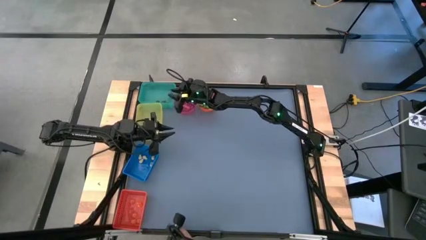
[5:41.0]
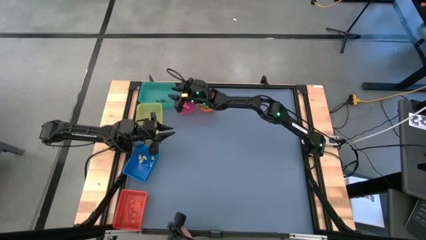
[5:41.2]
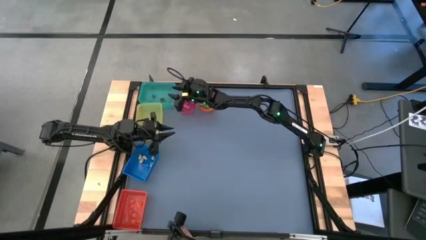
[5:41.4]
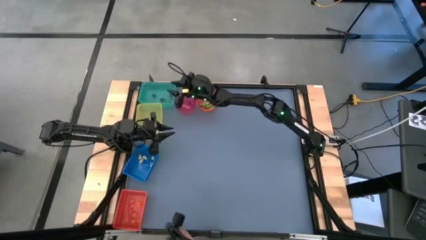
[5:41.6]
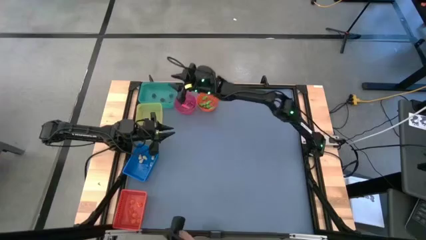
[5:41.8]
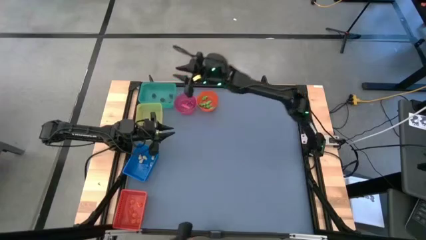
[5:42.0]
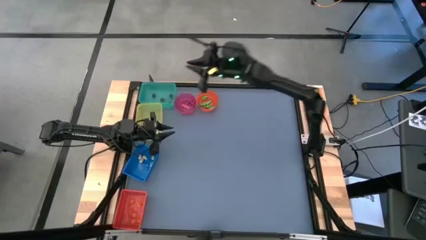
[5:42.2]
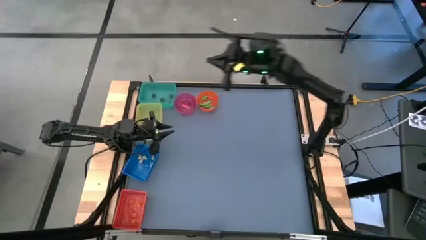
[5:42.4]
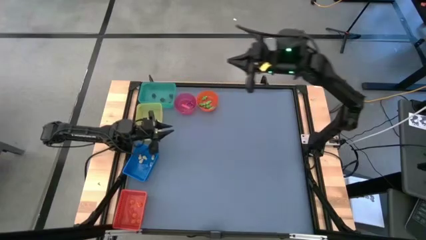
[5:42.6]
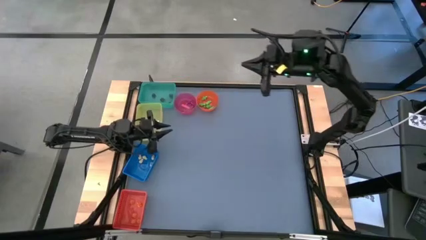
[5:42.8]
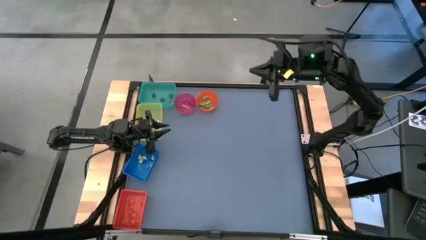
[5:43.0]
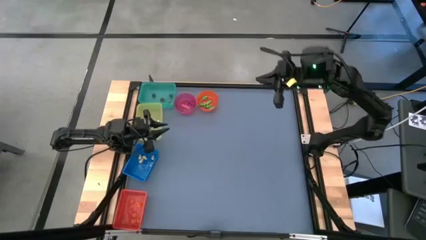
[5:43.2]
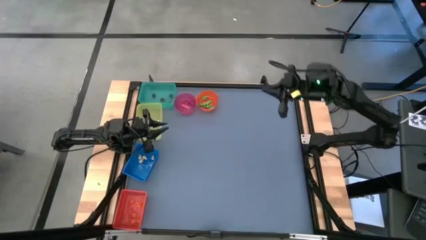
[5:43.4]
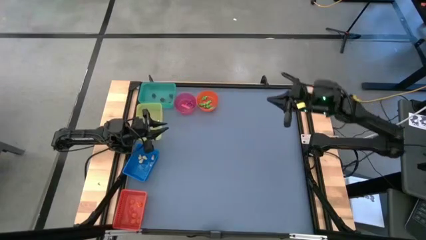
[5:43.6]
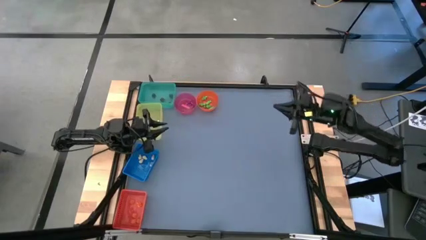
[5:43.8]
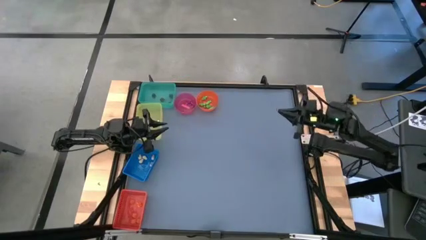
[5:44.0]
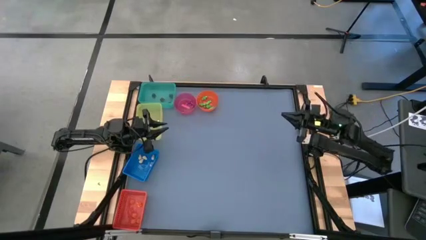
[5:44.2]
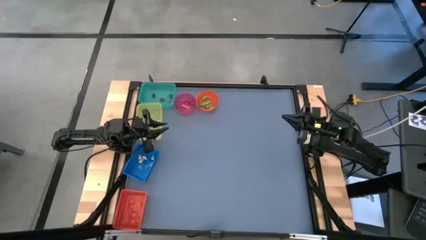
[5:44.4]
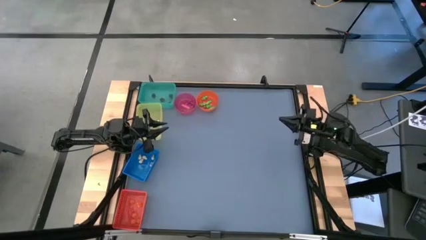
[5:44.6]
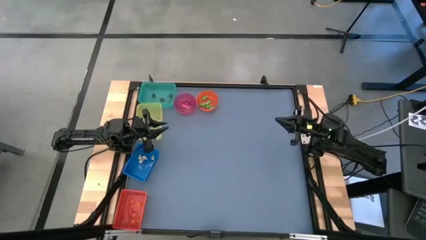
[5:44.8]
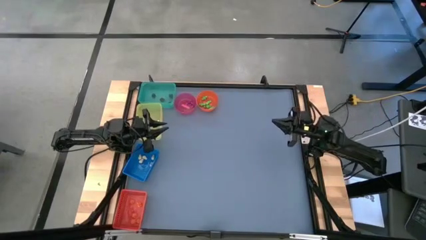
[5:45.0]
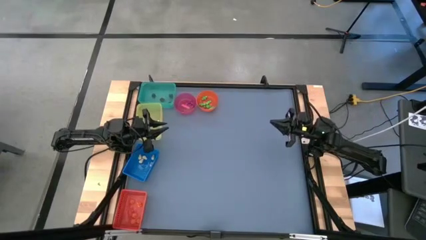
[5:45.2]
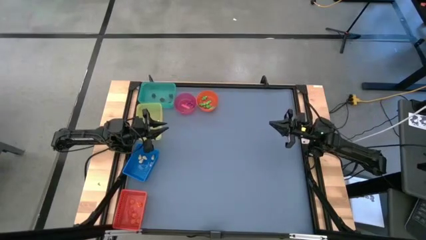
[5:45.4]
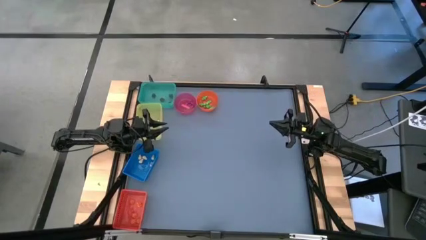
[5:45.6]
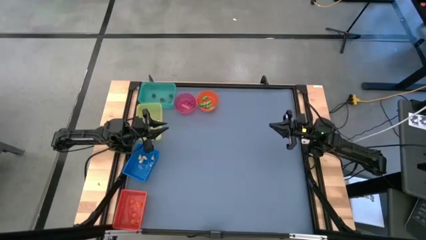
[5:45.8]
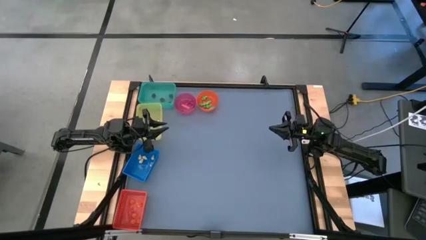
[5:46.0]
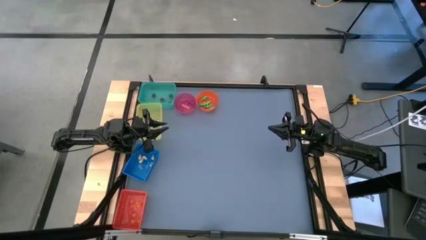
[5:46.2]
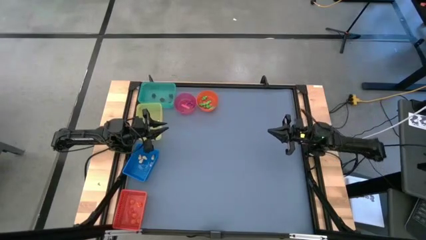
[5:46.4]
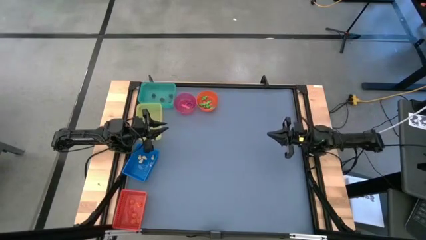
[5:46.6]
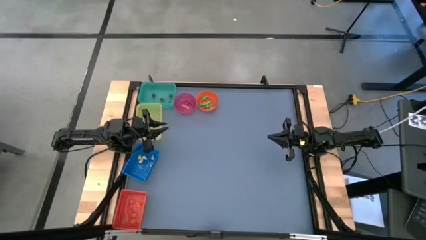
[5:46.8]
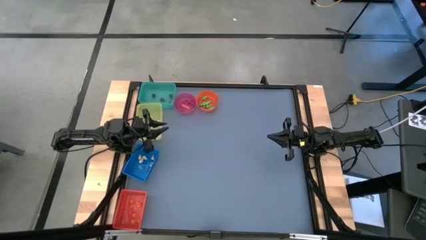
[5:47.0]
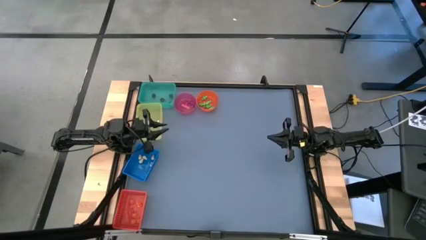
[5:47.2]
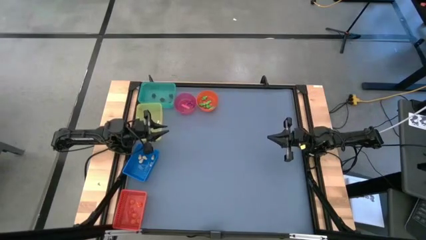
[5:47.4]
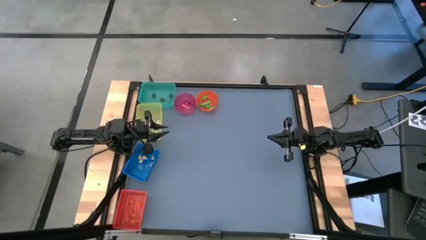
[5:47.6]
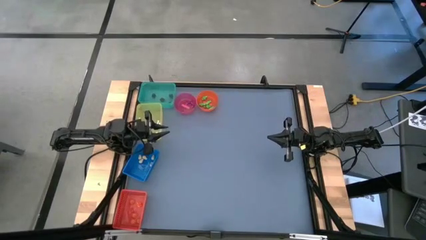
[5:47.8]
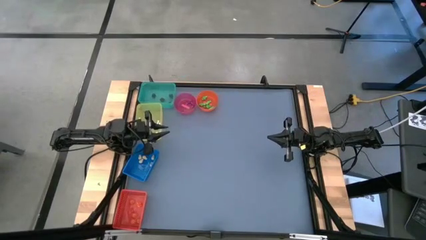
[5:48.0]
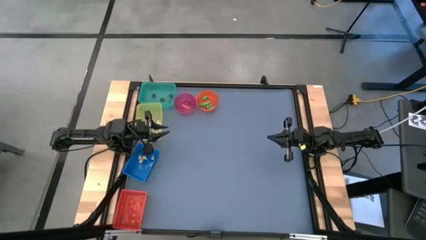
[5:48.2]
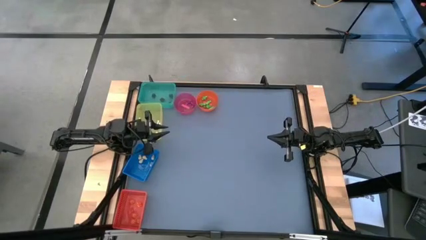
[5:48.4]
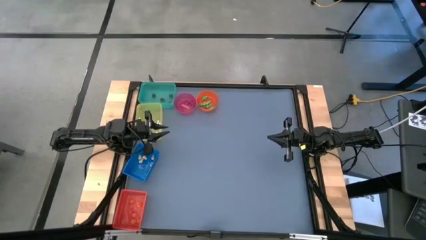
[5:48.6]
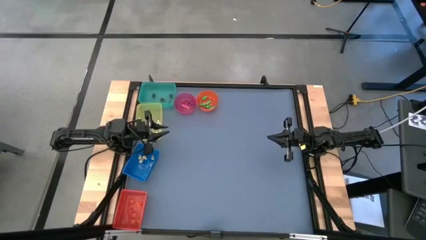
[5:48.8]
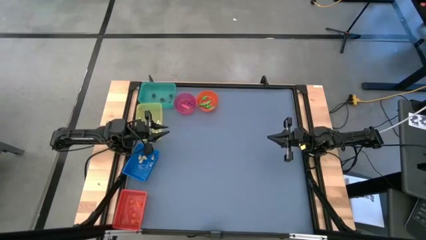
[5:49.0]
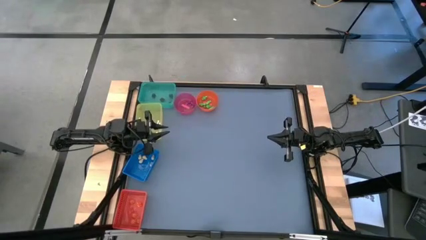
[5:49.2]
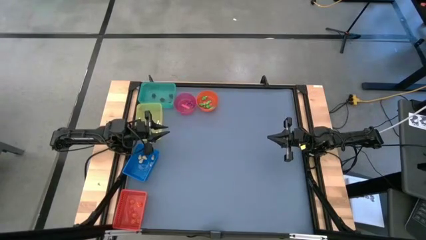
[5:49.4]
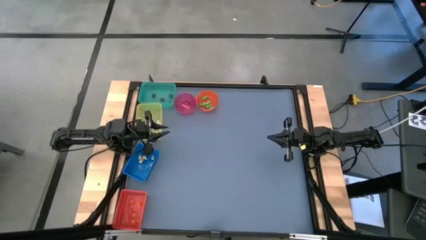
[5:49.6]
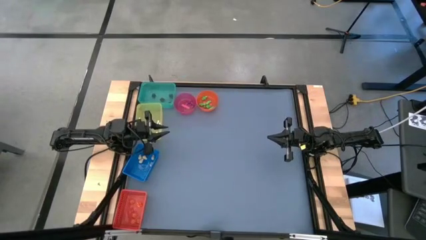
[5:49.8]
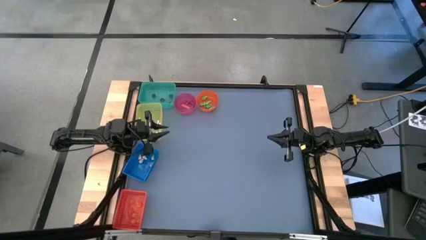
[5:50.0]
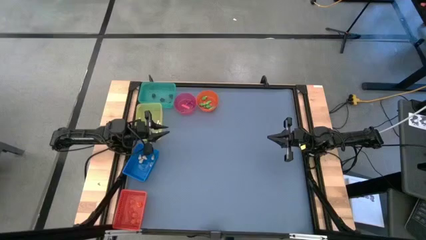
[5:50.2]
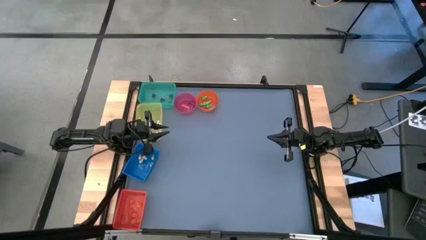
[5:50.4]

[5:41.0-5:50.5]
Task: Sort Halloween decoration
Return to Home Position
